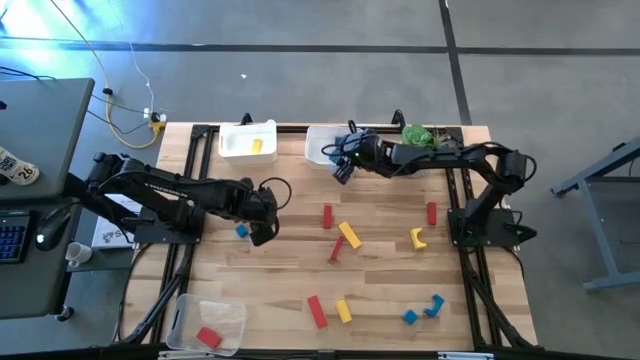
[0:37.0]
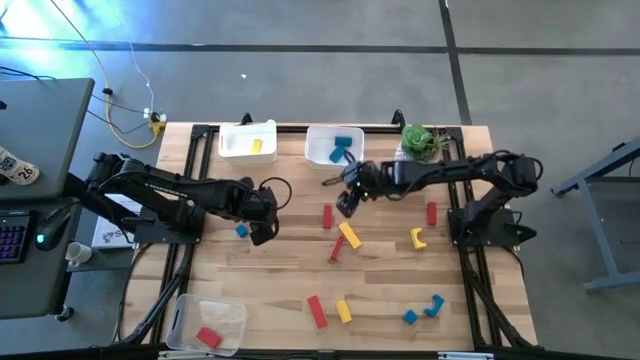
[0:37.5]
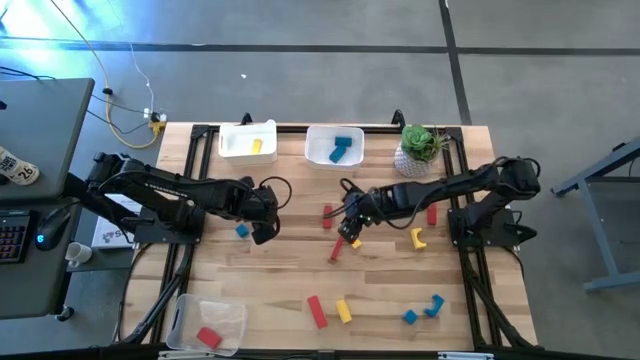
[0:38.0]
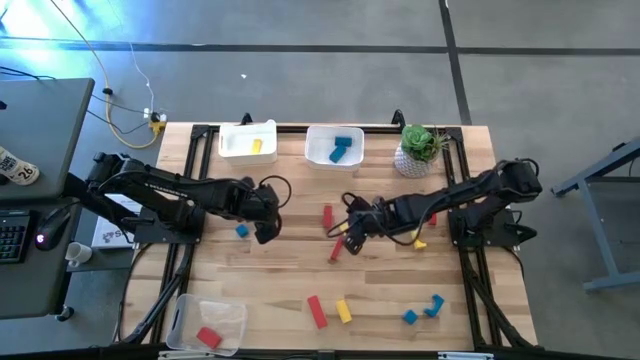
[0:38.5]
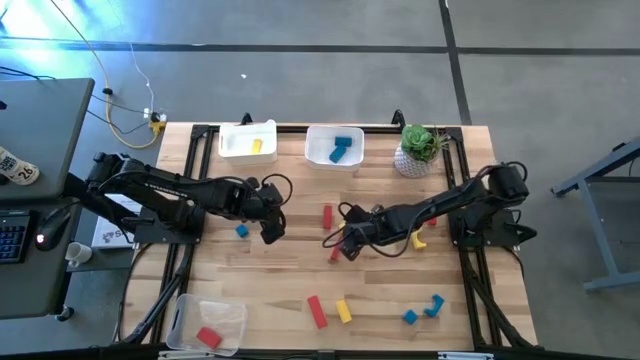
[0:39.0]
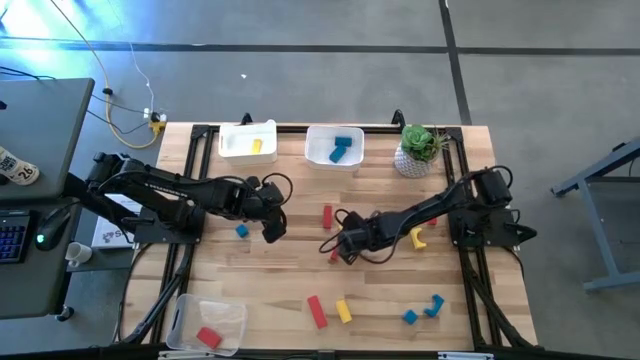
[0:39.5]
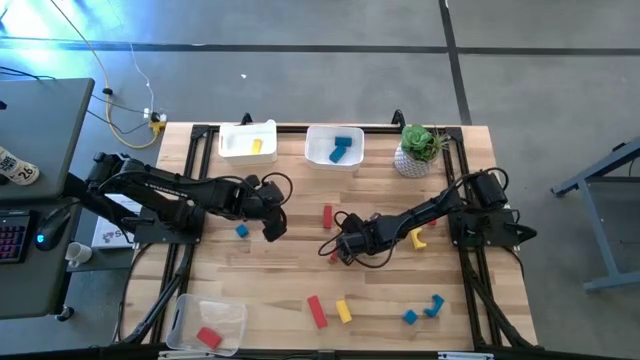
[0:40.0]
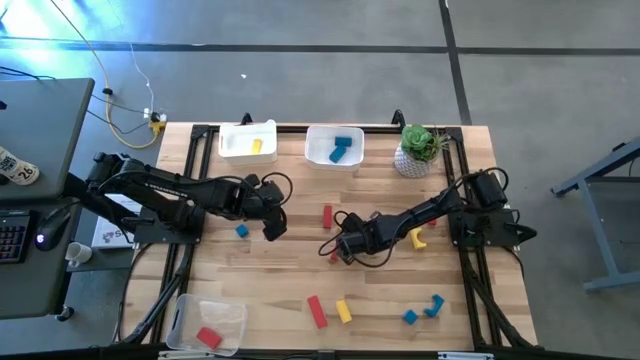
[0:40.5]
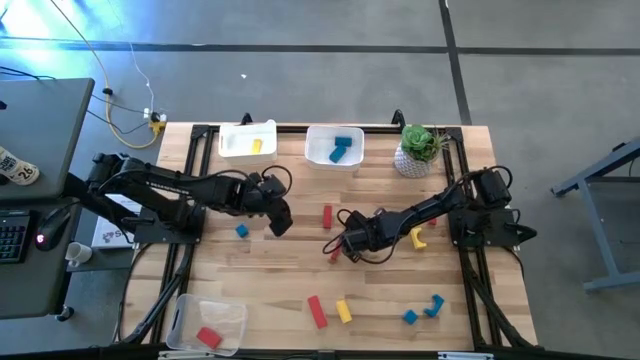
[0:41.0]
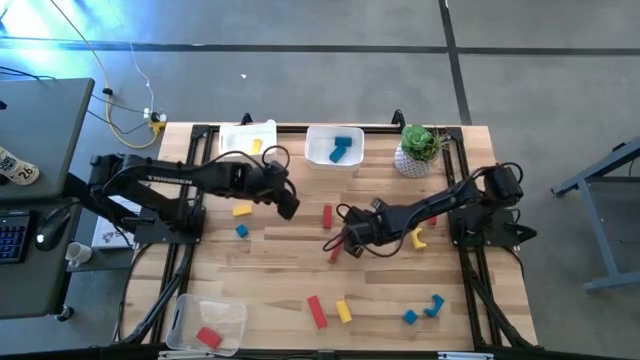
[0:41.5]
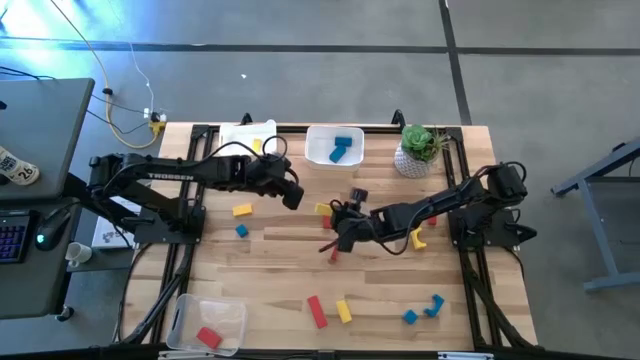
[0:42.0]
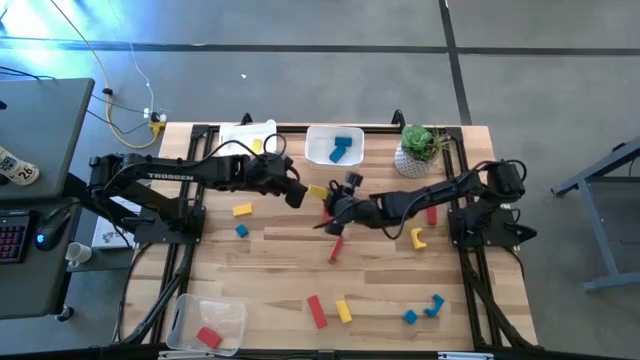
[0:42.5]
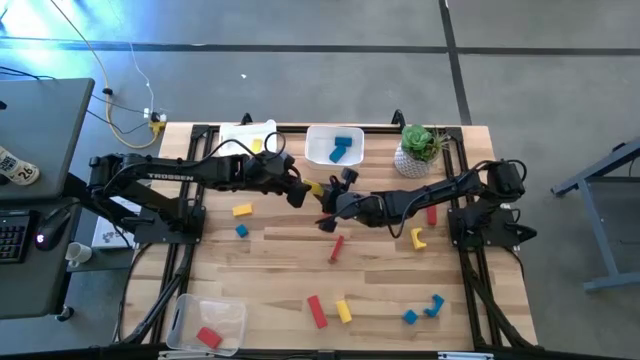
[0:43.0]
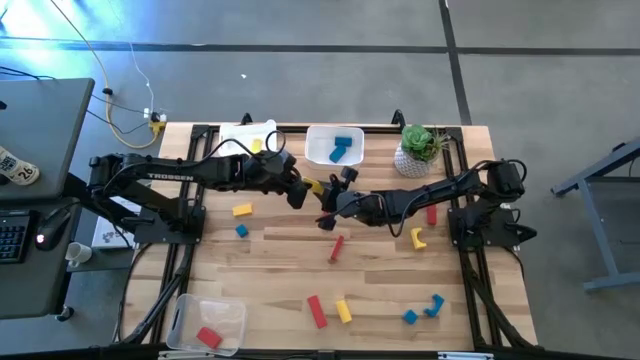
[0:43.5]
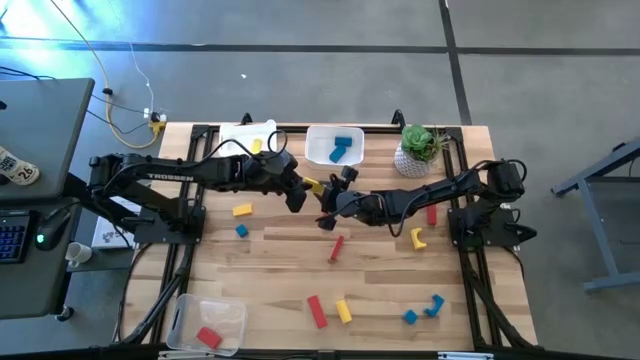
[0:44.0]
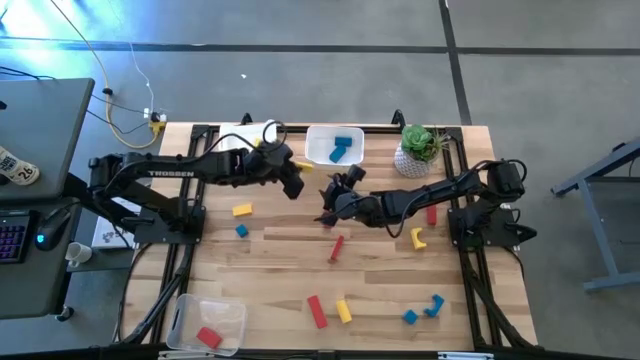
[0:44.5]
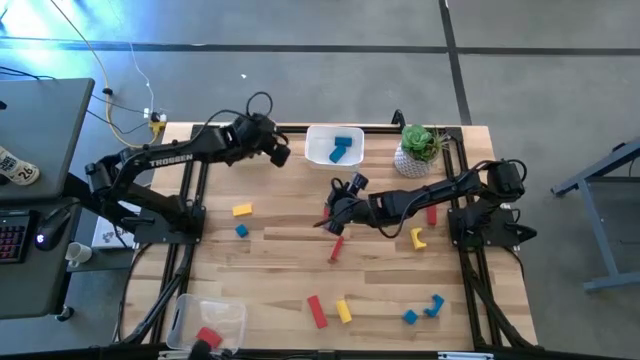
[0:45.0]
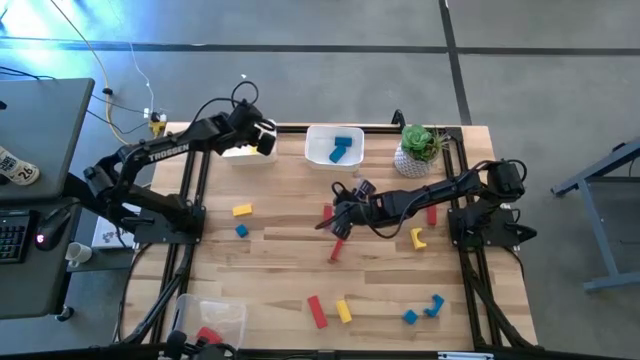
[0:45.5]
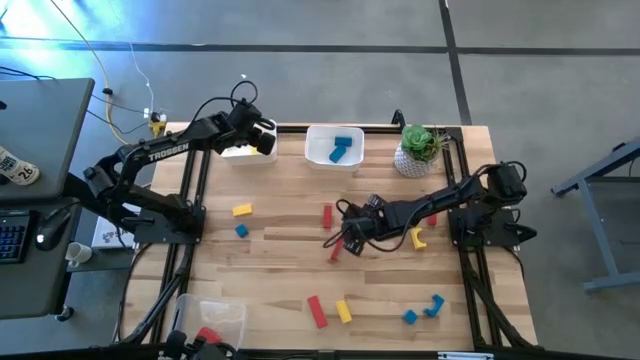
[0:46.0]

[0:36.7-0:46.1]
Task: Sort & place blocks by color
Put the yellow block into the left white bin

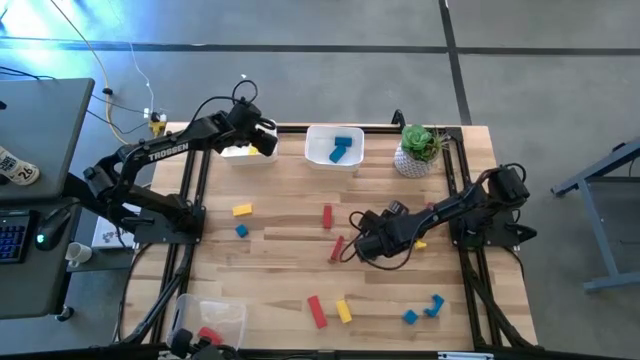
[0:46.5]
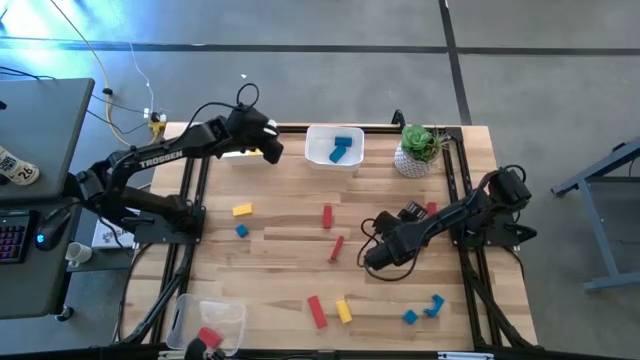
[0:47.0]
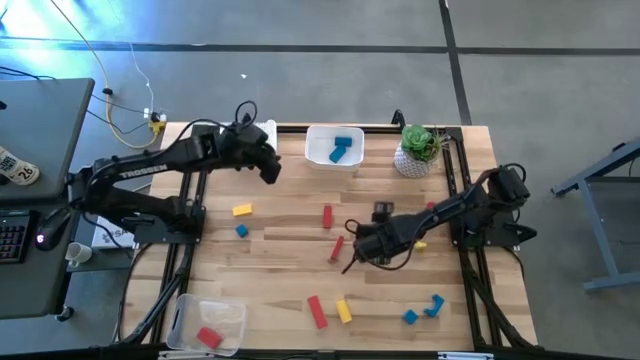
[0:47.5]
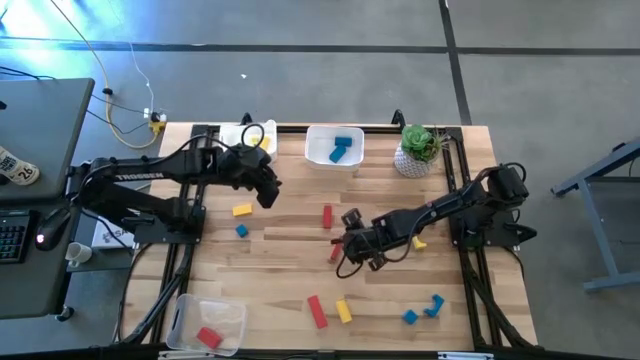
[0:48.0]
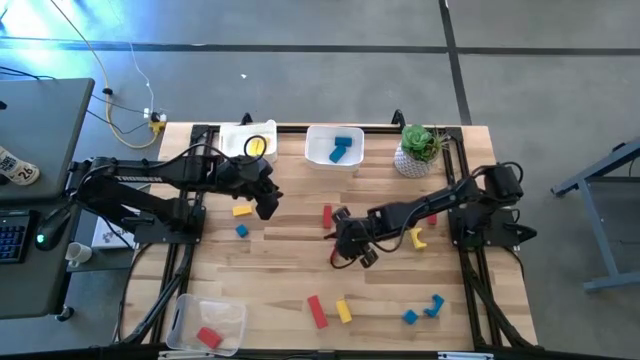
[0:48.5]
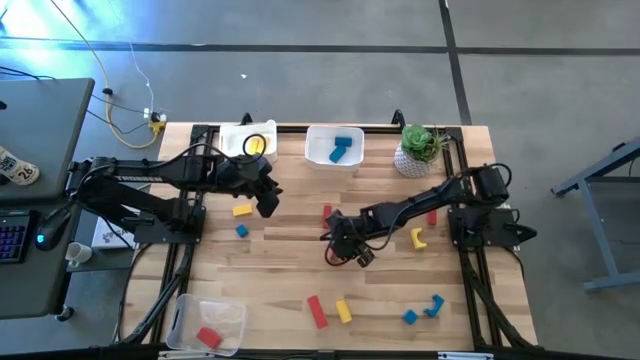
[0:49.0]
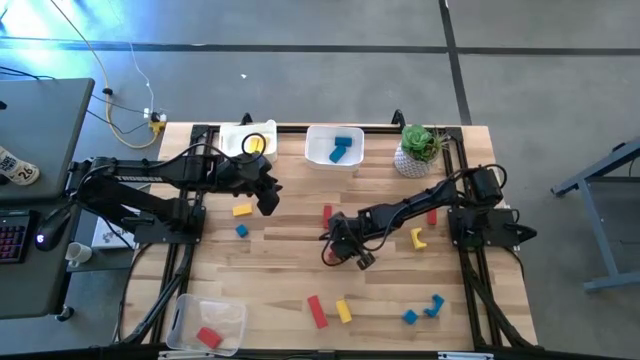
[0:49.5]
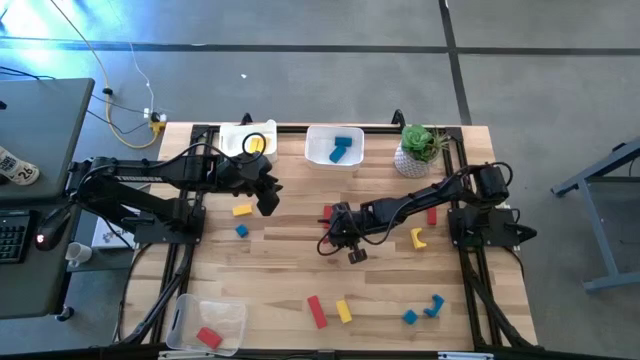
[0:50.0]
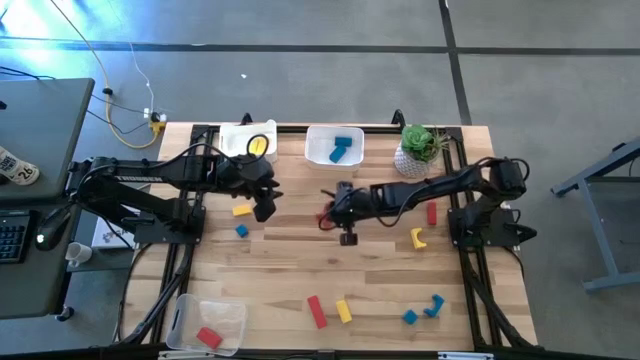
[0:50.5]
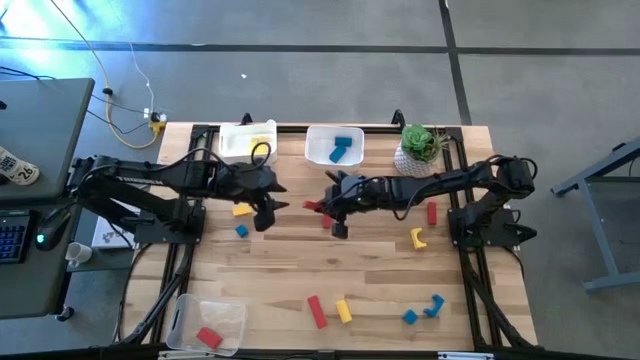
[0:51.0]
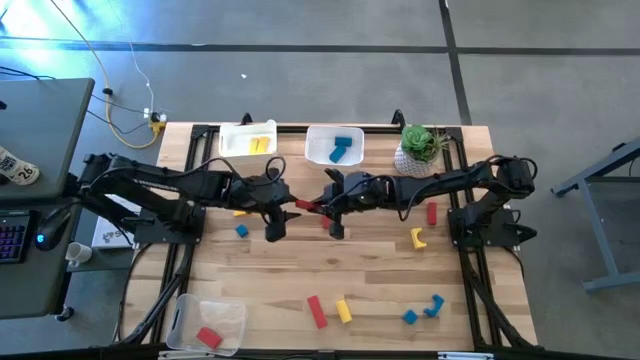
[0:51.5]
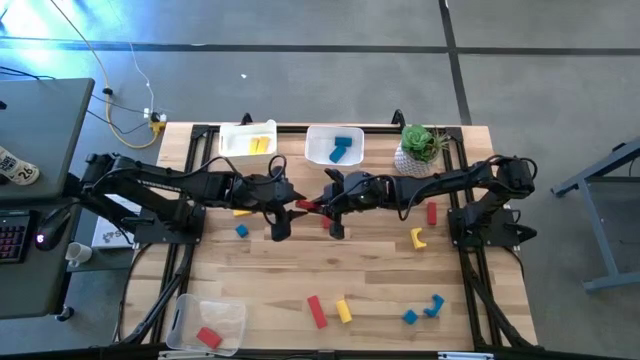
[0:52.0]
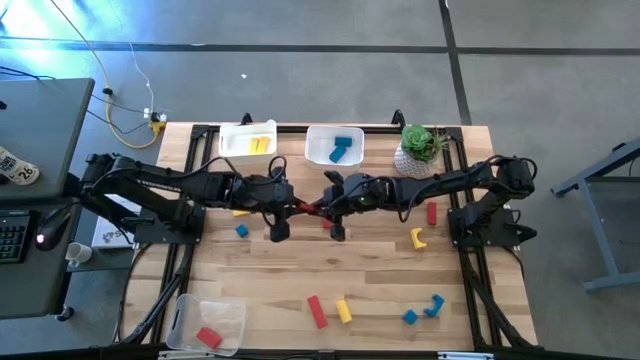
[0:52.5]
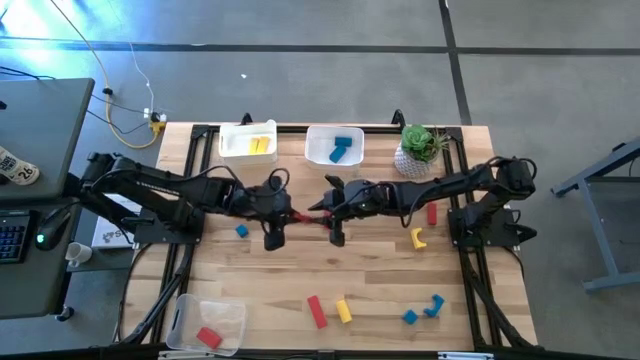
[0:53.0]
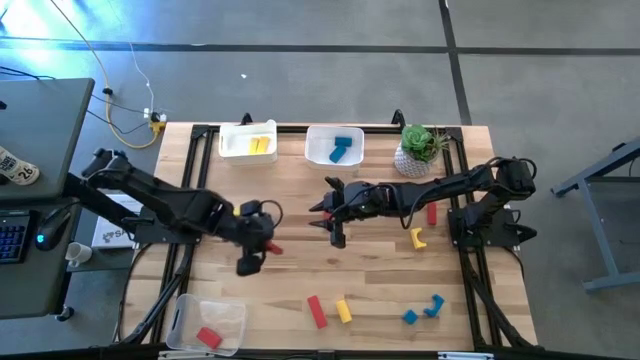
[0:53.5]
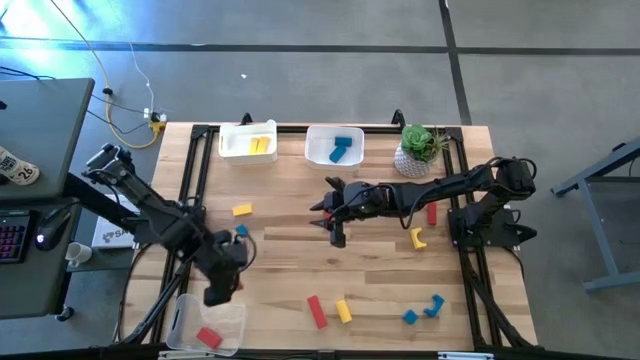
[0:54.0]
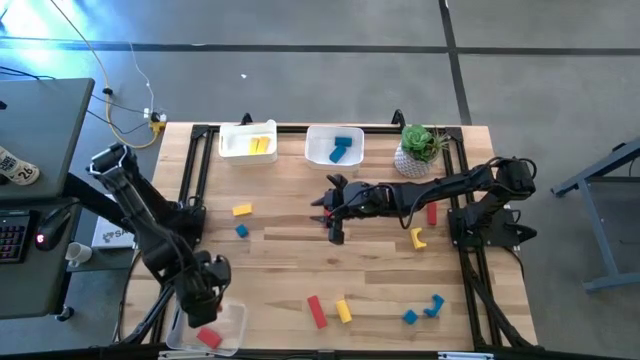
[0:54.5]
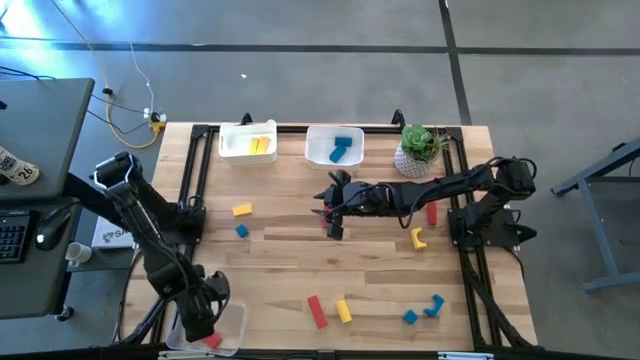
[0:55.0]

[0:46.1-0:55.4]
Put the red block into the transparent bin

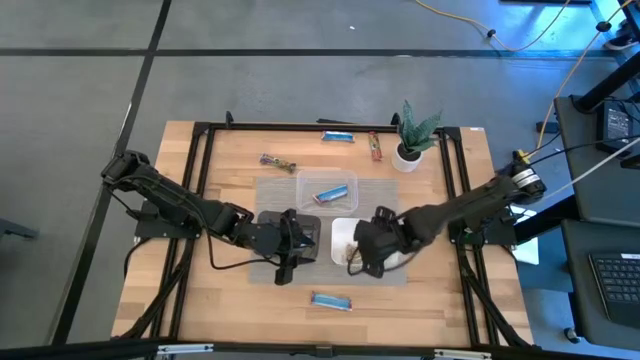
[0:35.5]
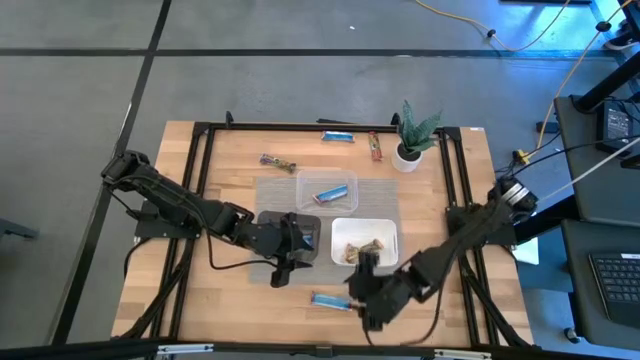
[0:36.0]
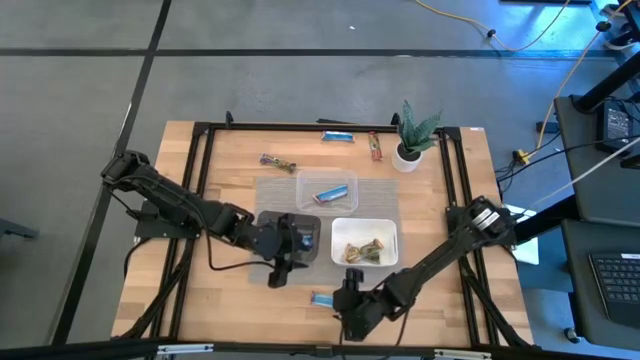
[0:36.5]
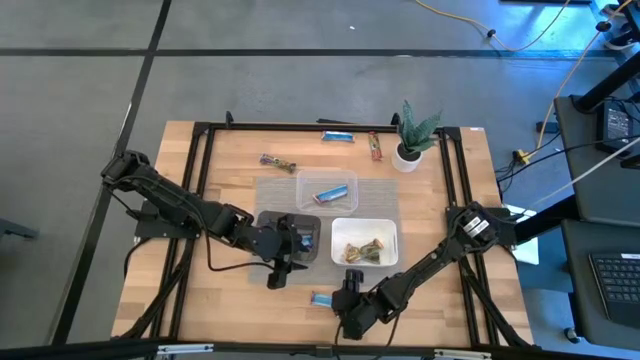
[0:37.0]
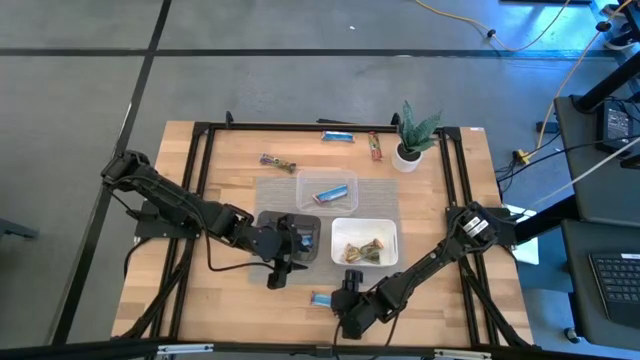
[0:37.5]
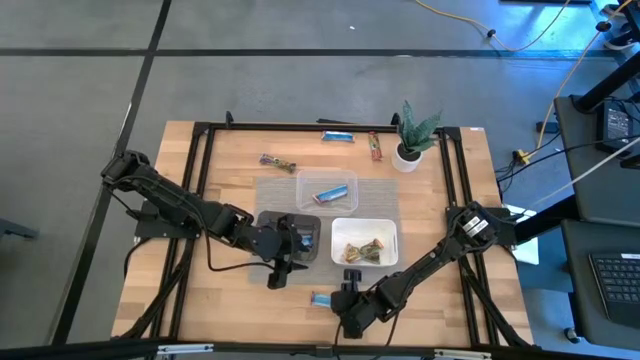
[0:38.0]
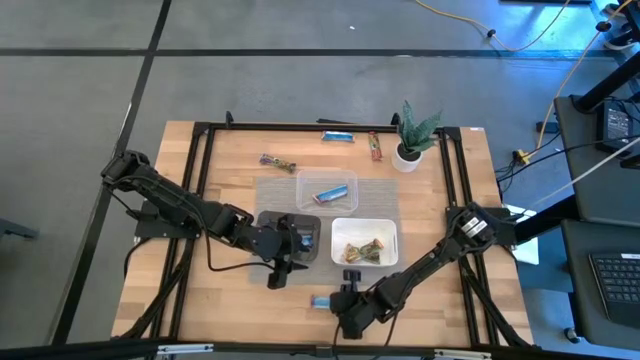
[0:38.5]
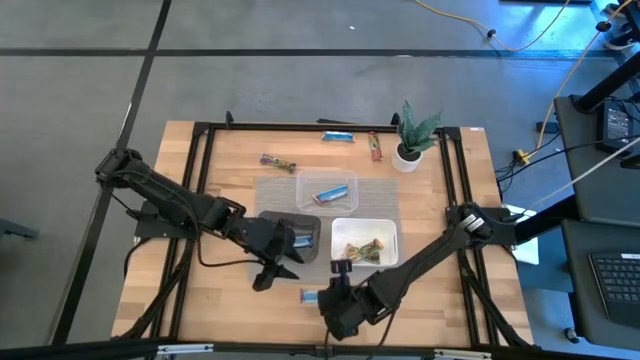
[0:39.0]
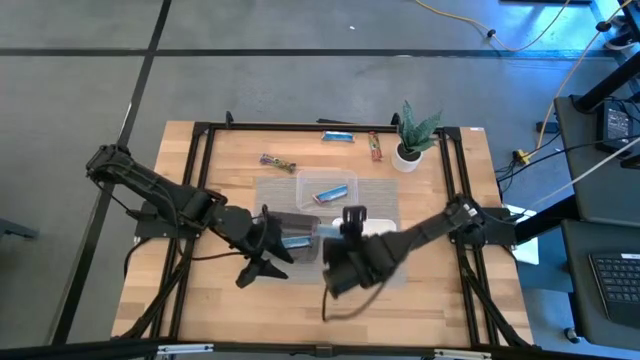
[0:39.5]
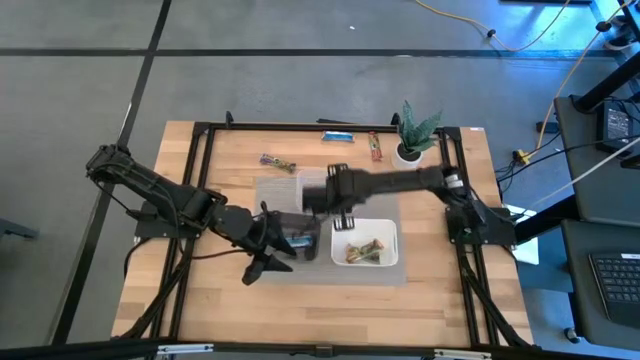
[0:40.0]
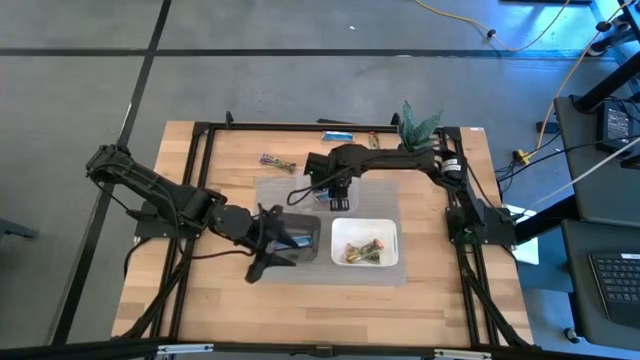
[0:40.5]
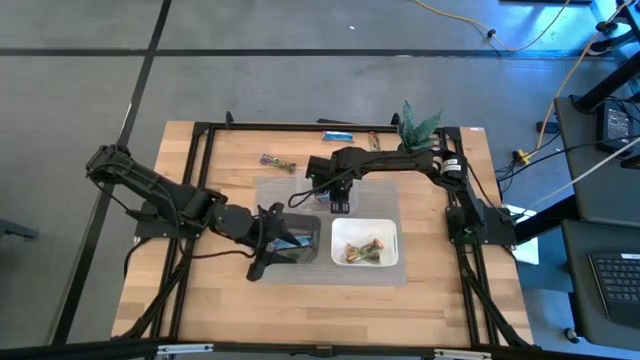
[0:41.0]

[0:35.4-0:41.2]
Task: Pick and place Granola Bars by type
Put the bottom red granola bar into the transparent bin
